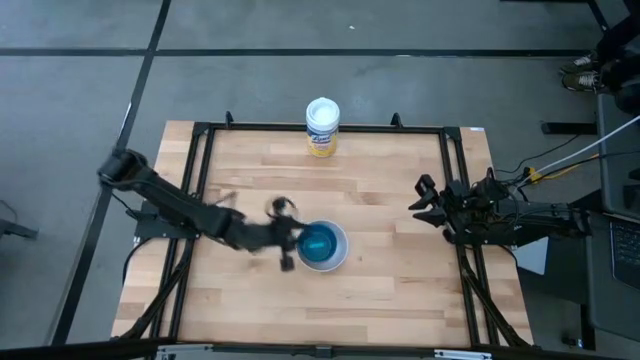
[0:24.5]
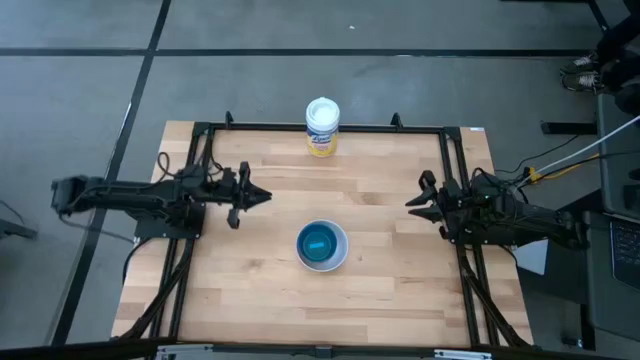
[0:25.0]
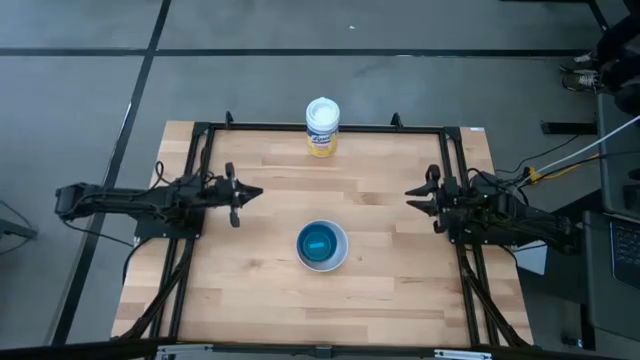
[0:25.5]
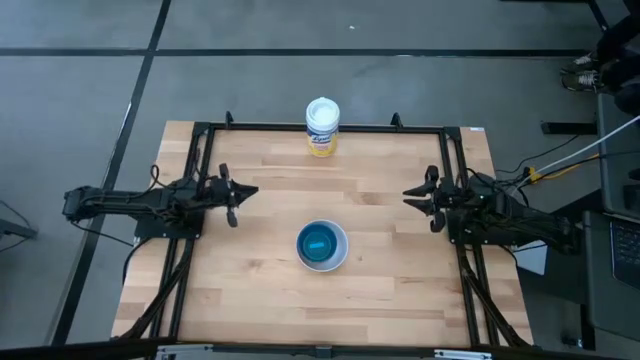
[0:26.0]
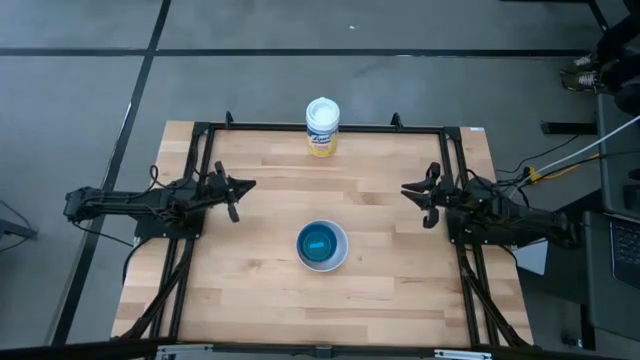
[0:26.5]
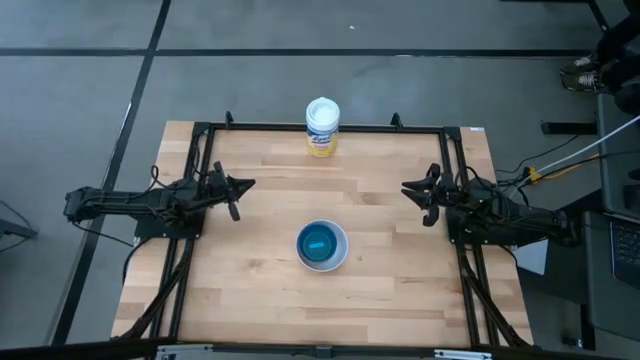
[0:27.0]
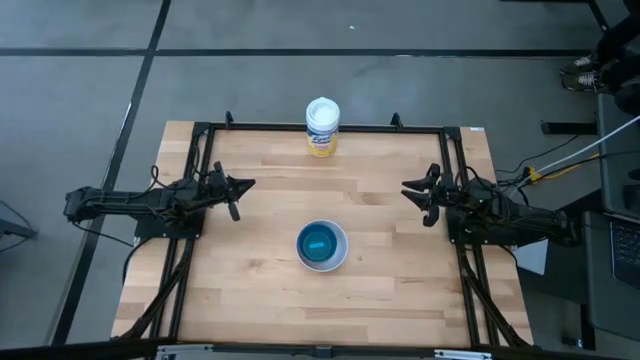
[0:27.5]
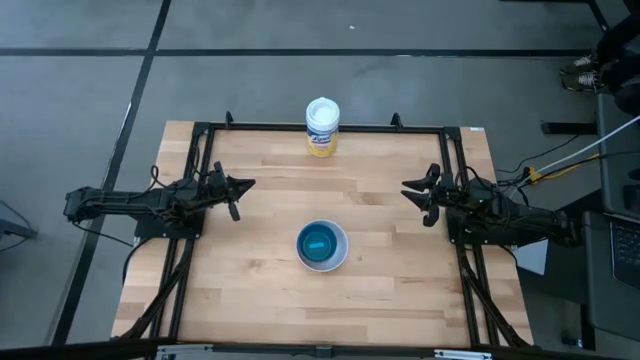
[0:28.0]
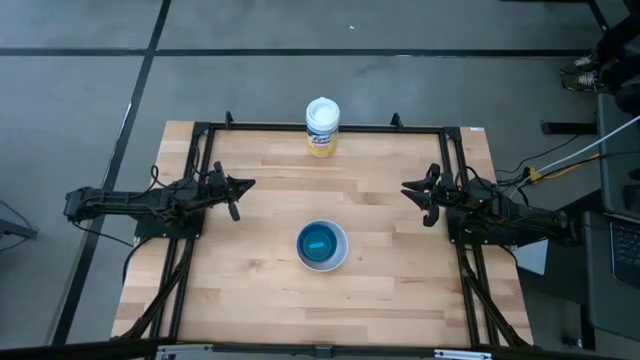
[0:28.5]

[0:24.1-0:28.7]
Return to Home Position

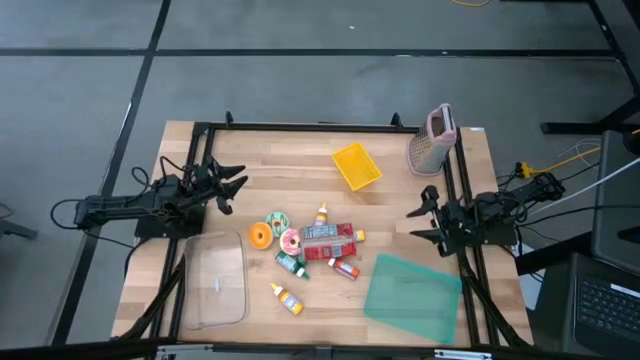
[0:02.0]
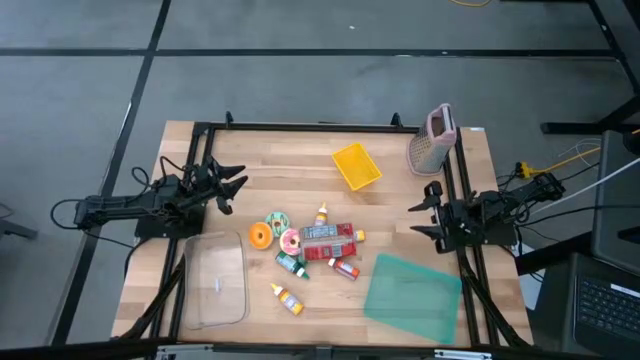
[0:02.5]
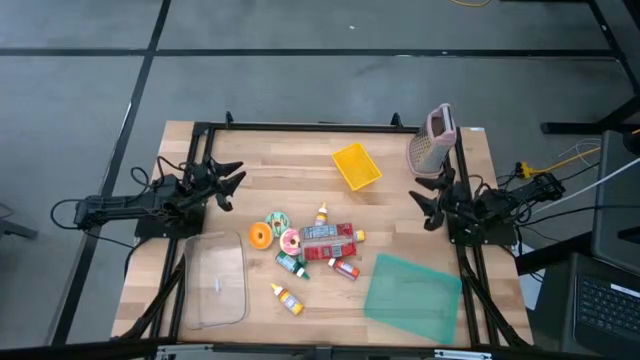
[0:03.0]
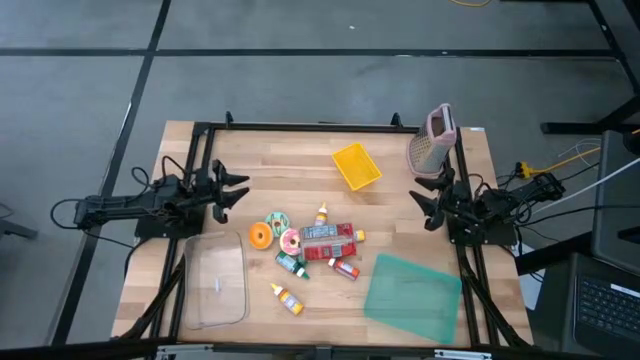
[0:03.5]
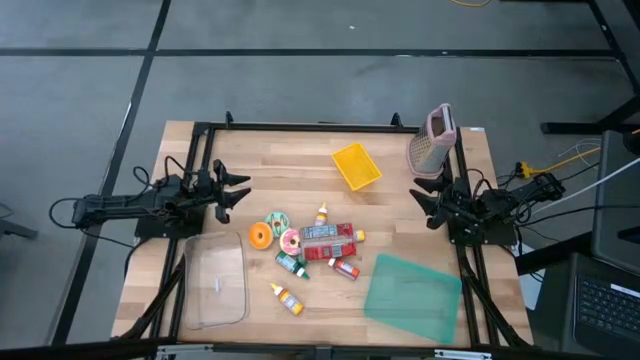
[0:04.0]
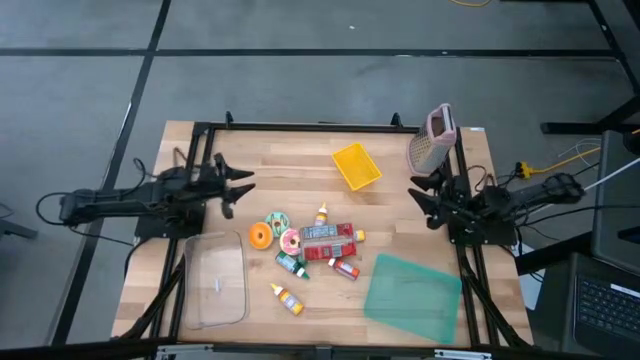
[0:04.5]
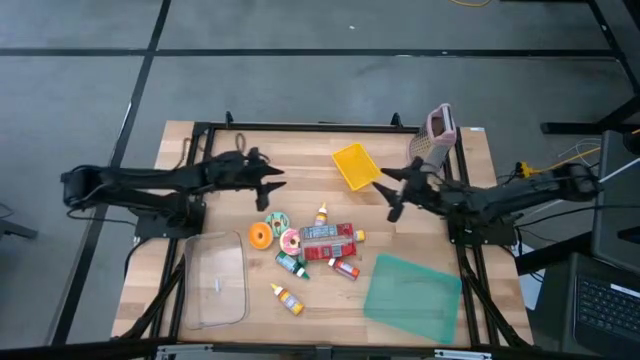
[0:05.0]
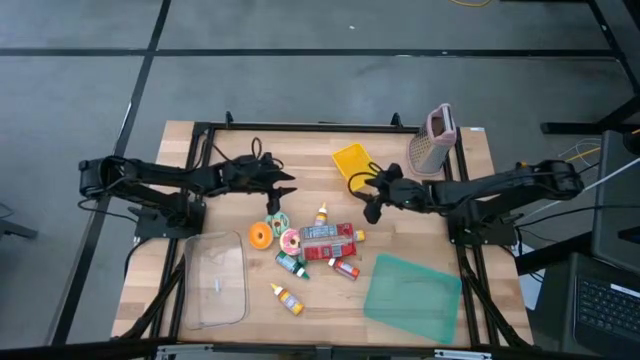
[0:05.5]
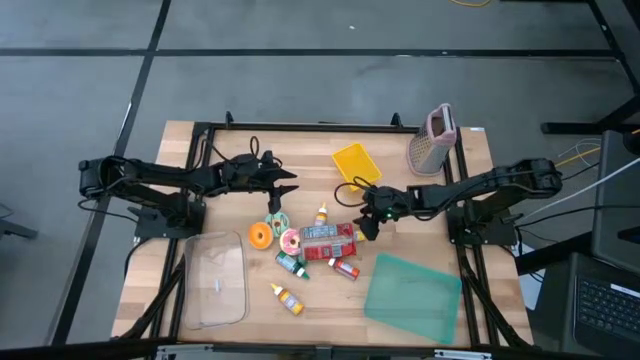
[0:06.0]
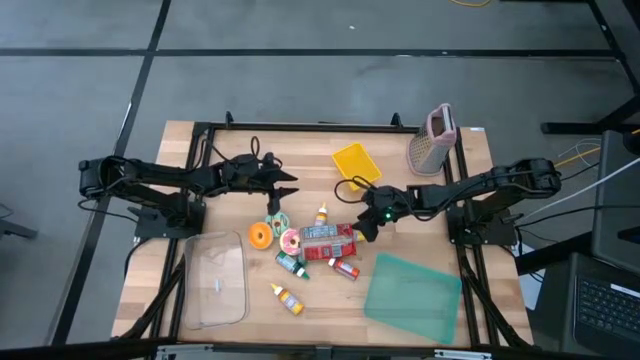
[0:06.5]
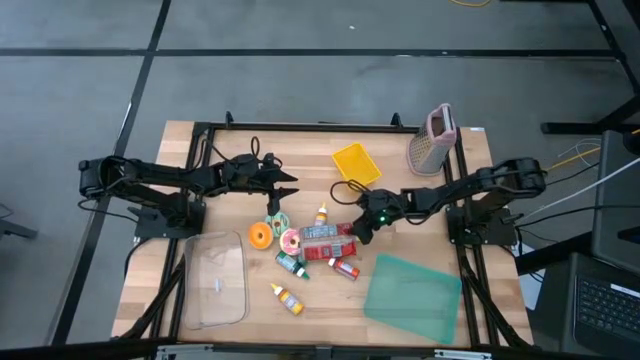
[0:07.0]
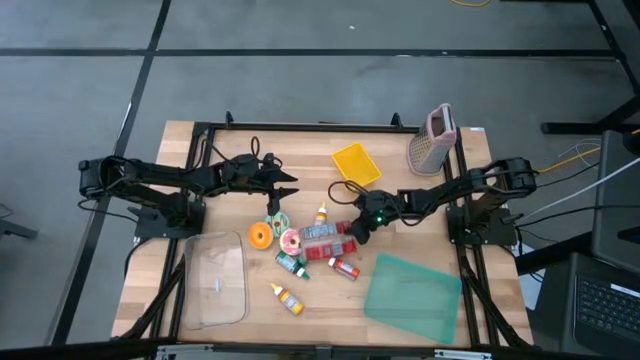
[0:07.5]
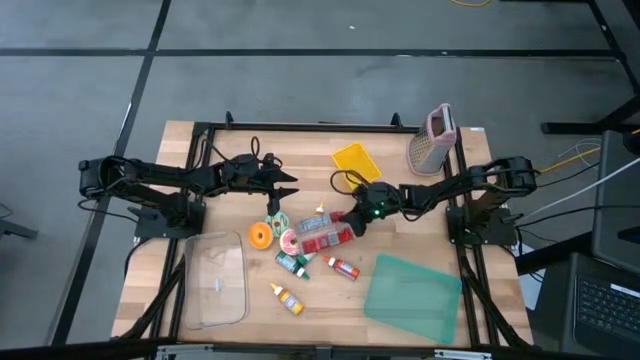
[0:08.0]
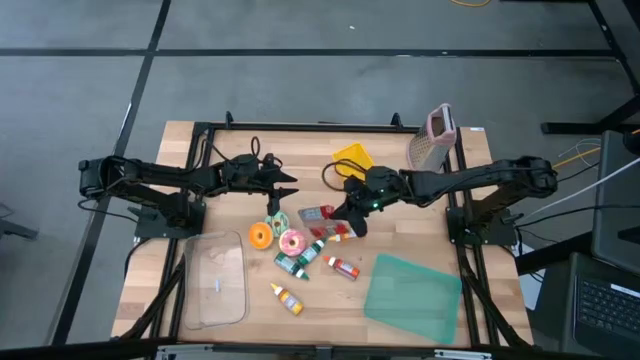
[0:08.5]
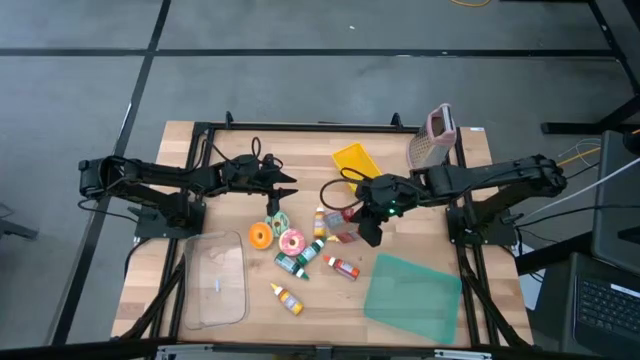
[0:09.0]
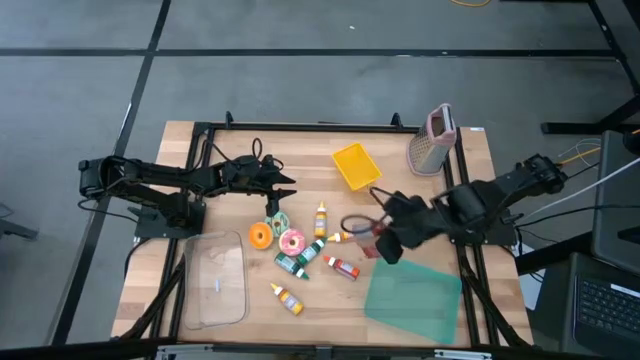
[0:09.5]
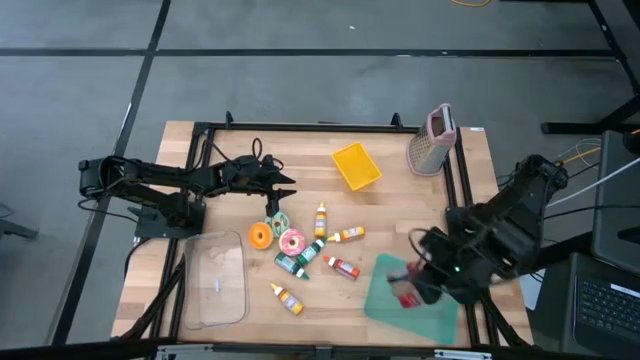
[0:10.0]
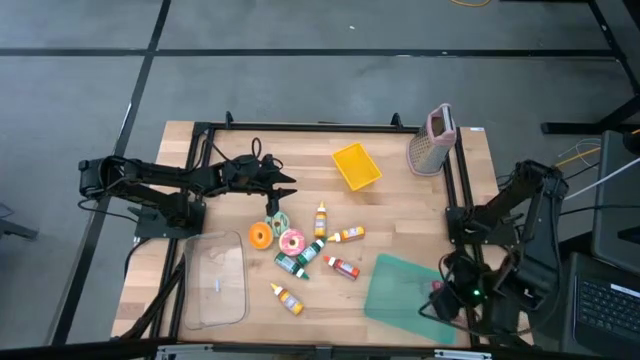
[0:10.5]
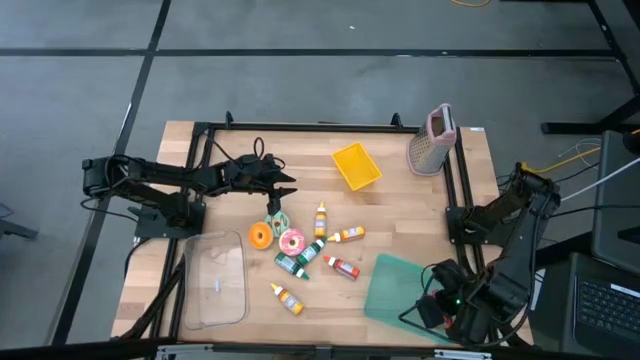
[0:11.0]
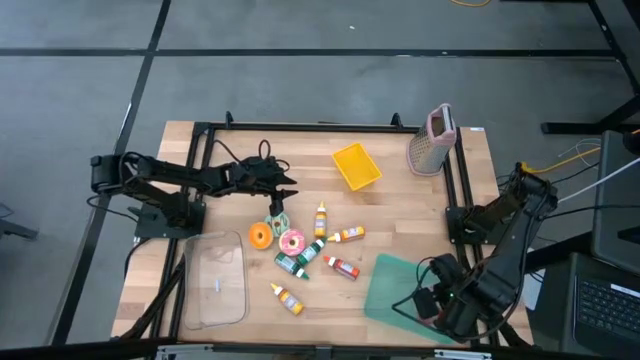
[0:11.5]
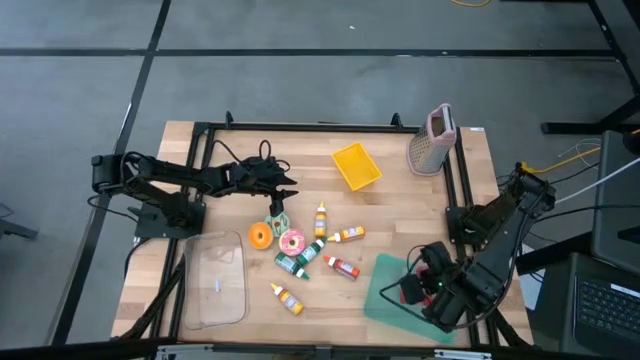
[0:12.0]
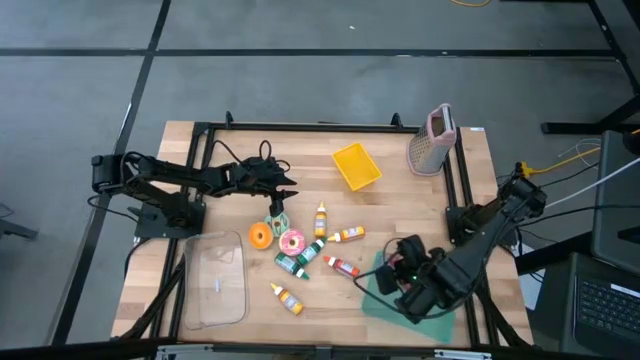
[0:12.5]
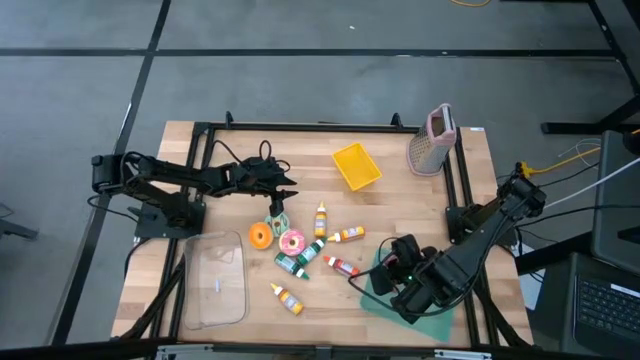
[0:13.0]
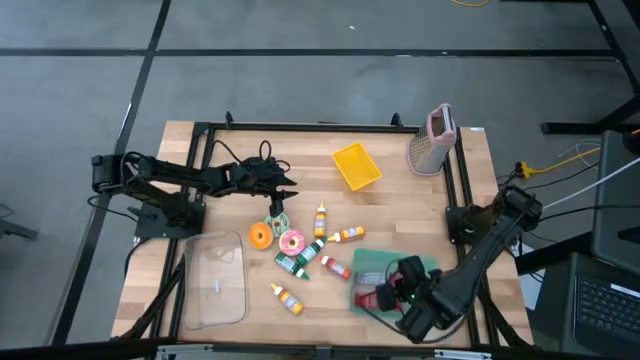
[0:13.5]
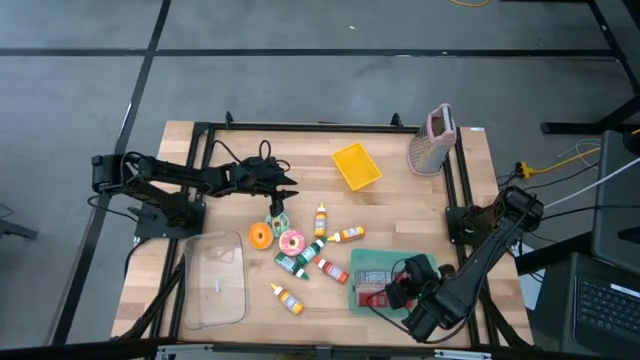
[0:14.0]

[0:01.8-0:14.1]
Put the popcorn bag into the green bin

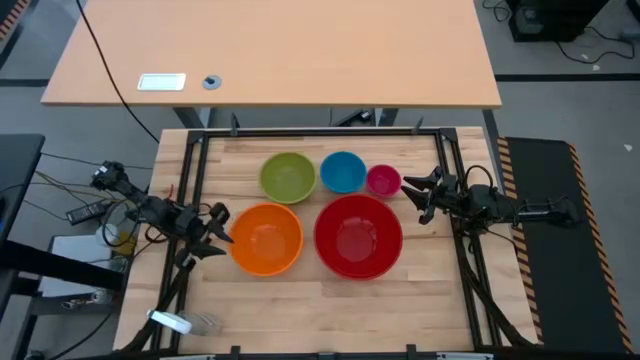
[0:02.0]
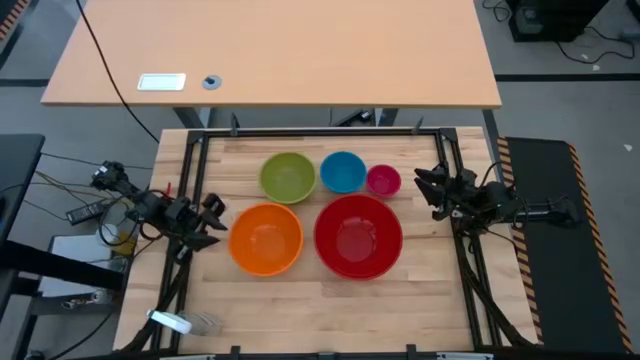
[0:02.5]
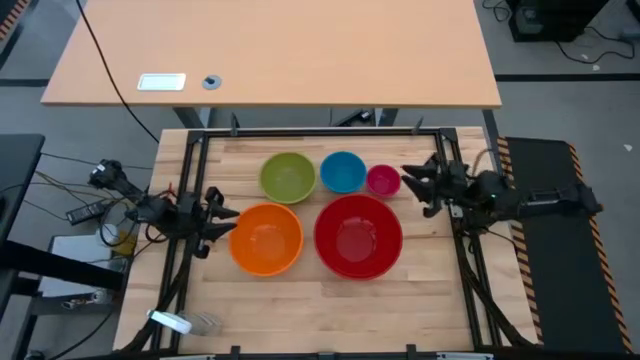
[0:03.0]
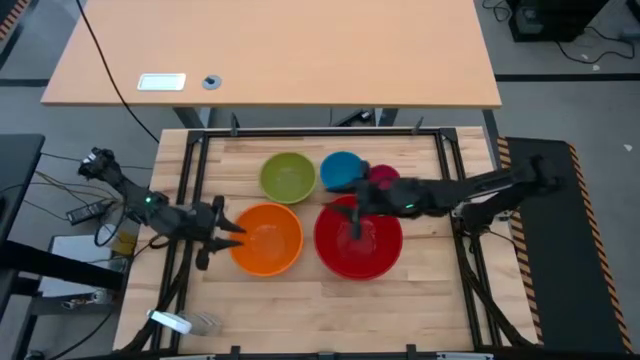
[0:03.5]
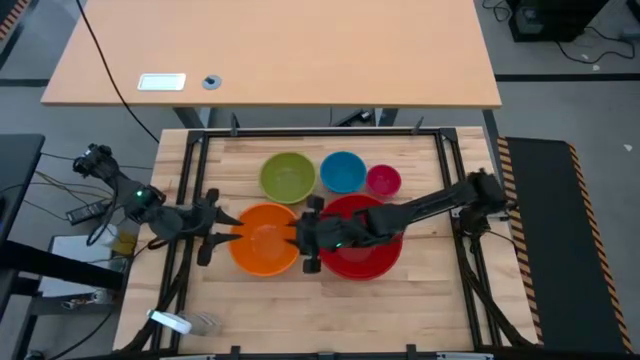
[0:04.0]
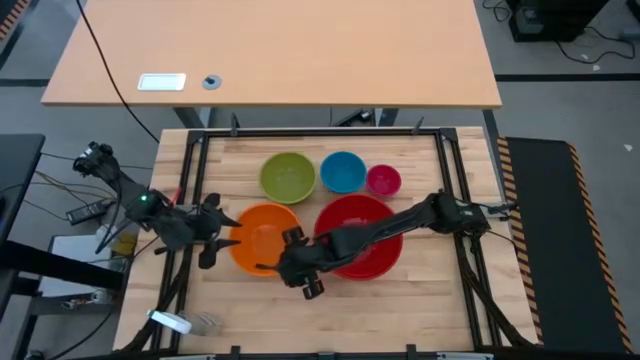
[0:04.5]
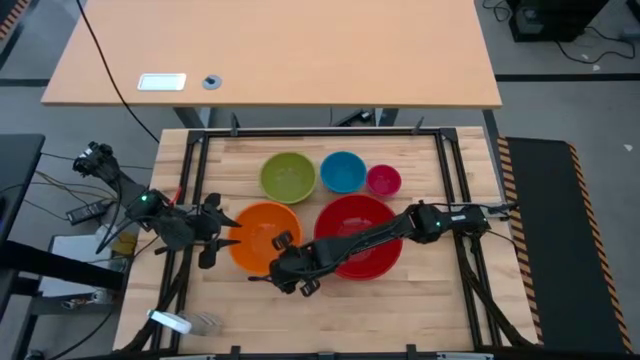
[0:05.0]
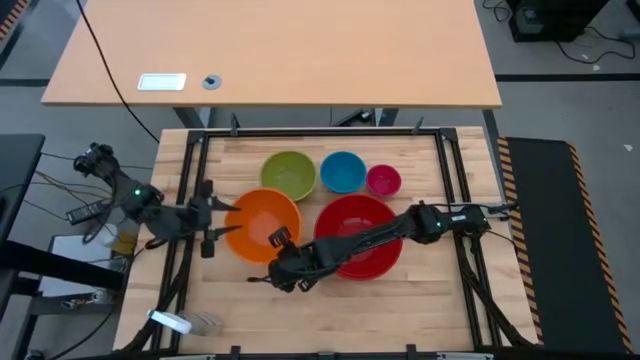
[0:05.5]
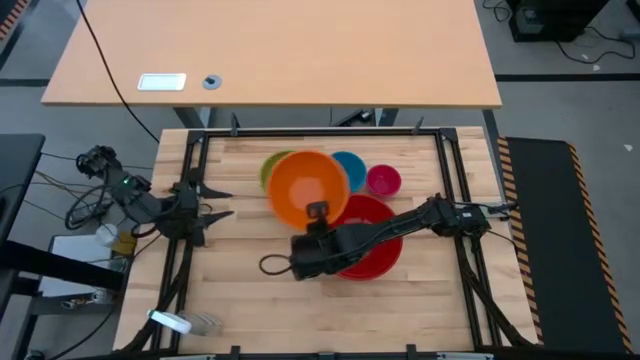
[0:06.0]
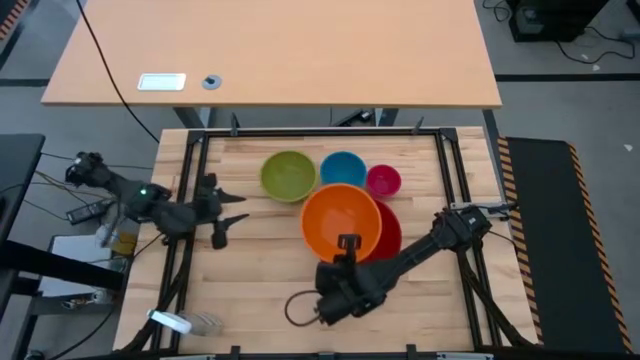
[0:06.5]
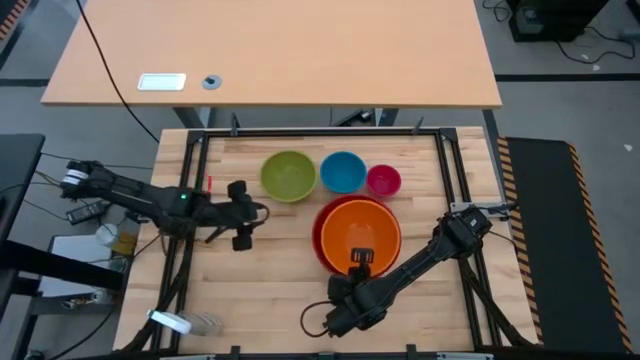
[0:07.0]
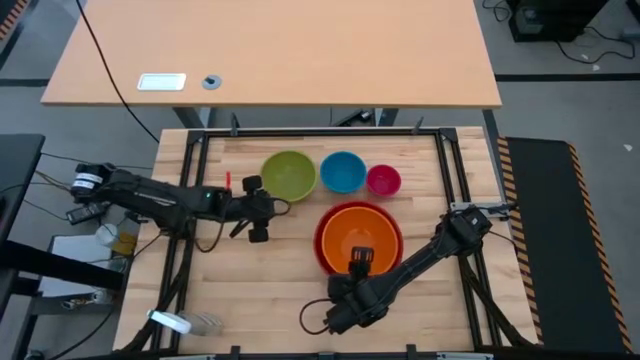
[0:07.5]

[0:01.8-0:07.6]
Stack the orange bowl on top of the red bowl
